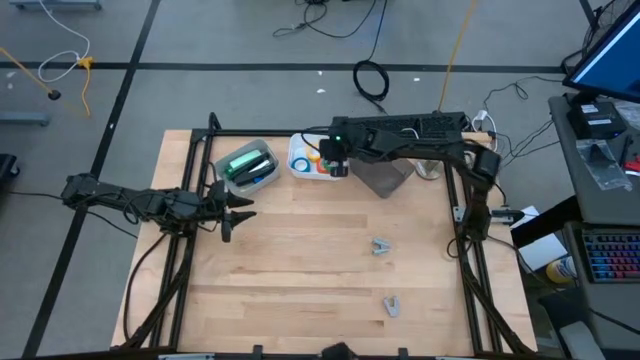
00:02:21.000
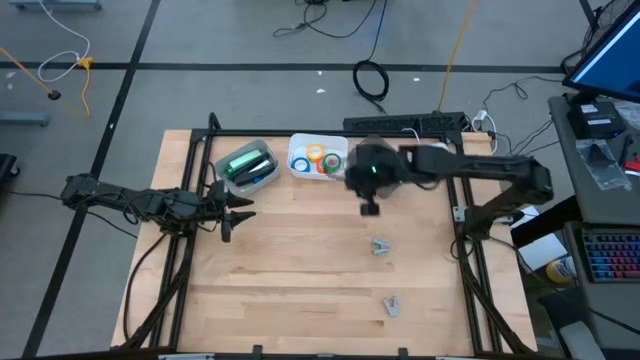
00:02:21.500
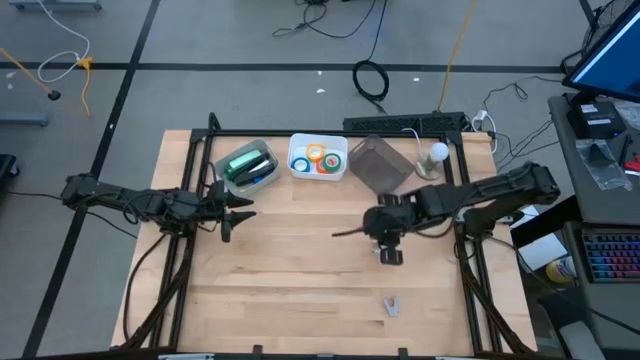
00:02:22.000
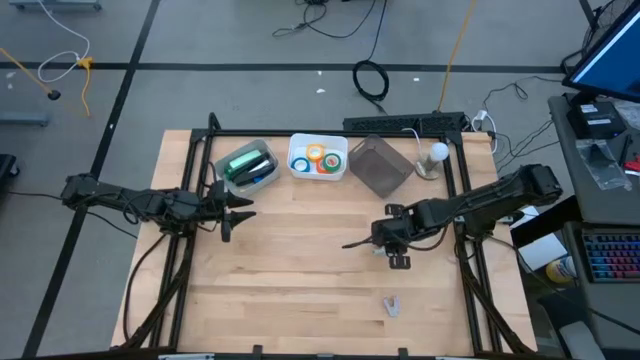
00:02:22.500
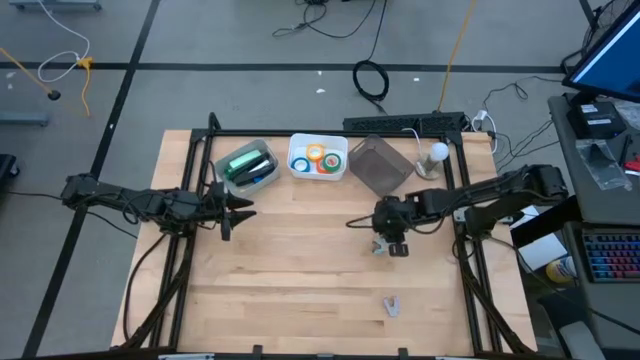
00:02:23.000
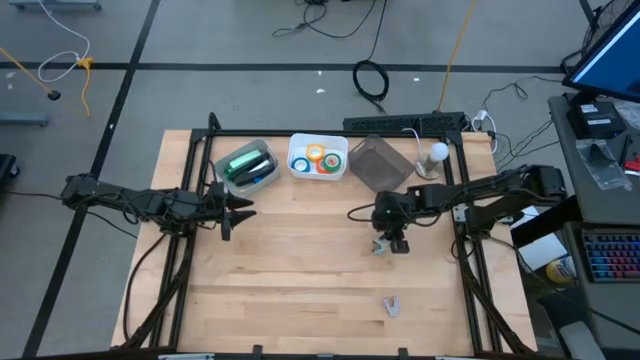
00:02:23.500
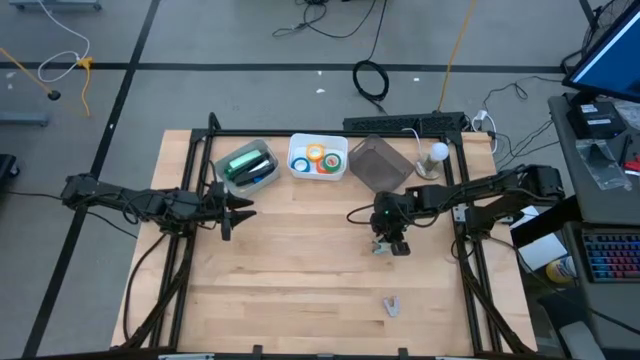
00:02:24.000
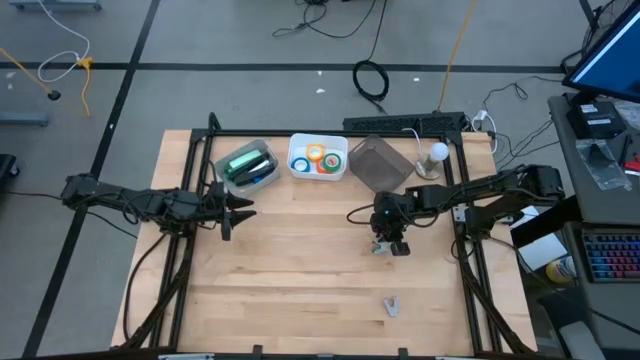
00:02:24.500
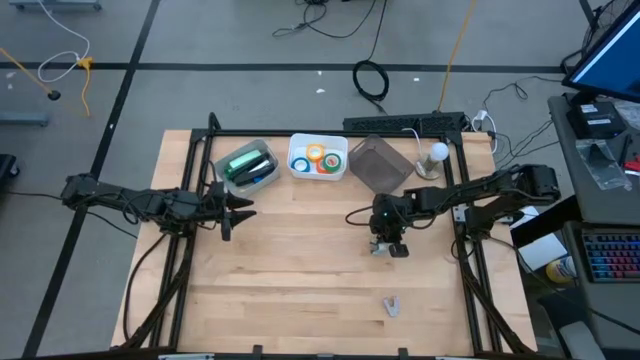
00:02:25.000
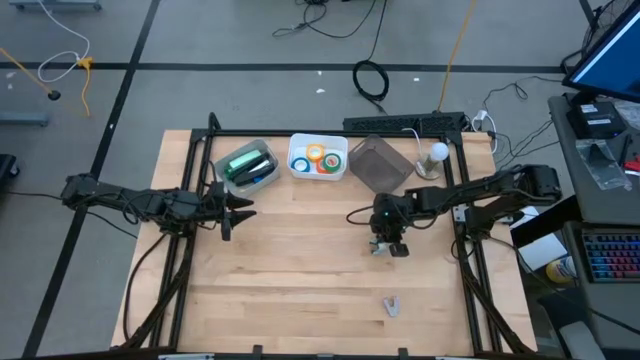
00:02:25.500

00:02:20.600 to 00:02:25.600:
Task: Pick and place Stapler, Stapler remover, tape
Put the light blue staple remover into the black bin

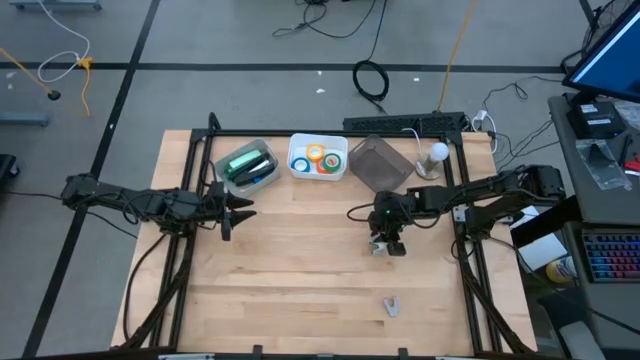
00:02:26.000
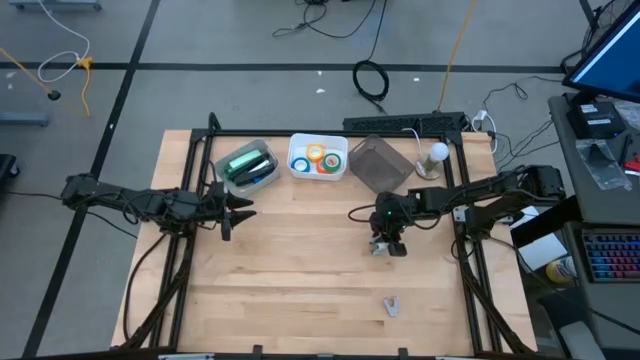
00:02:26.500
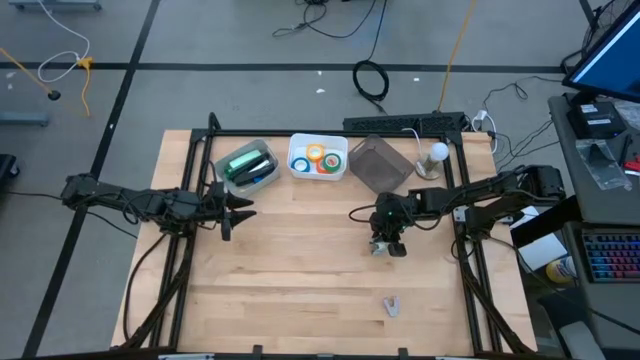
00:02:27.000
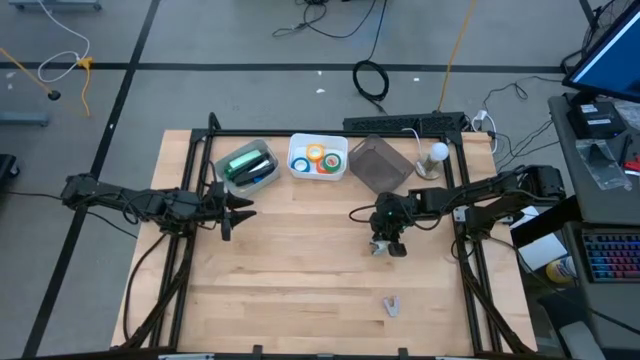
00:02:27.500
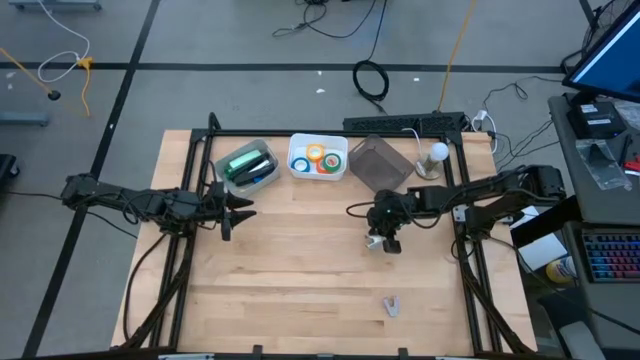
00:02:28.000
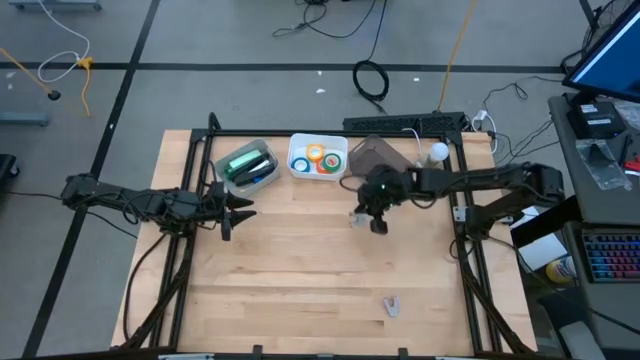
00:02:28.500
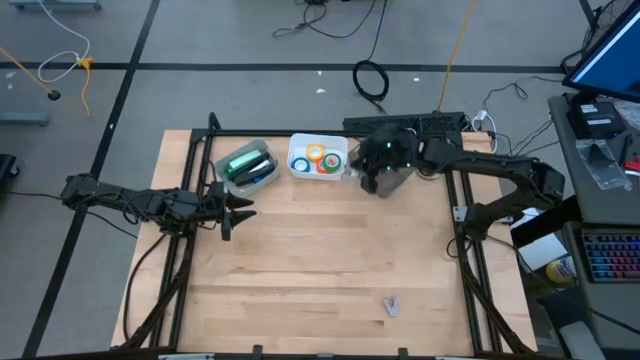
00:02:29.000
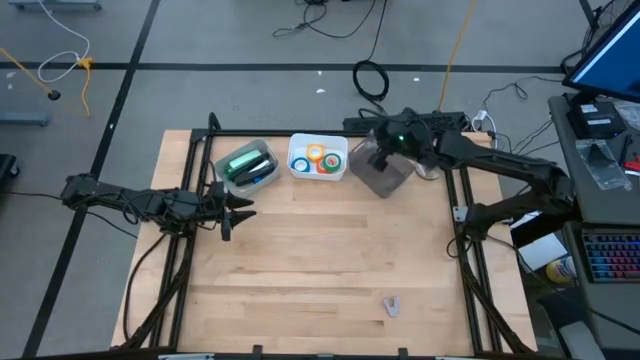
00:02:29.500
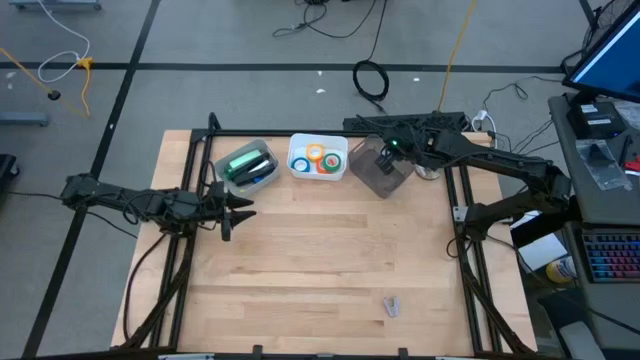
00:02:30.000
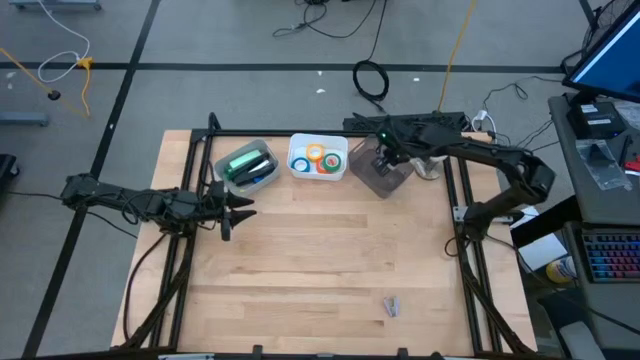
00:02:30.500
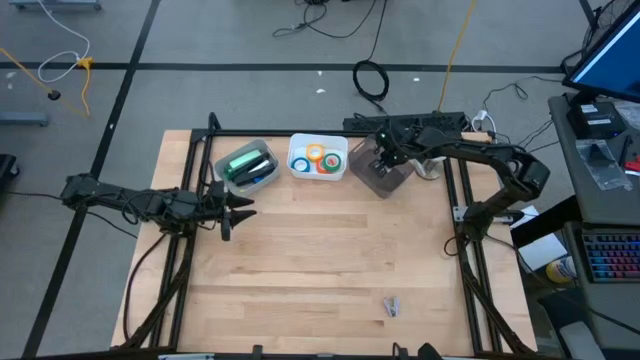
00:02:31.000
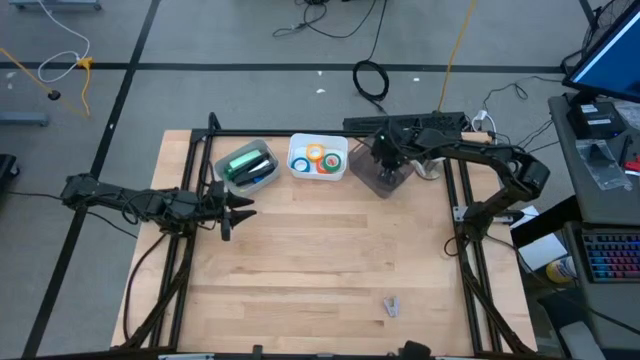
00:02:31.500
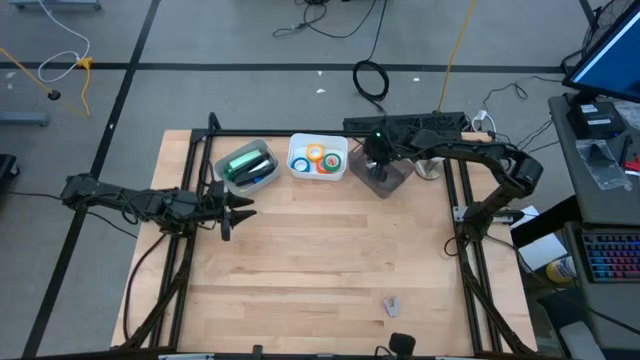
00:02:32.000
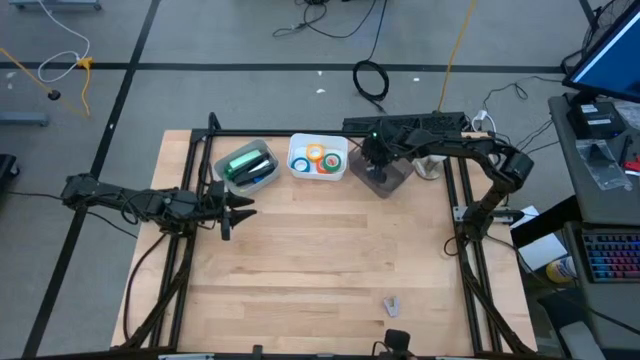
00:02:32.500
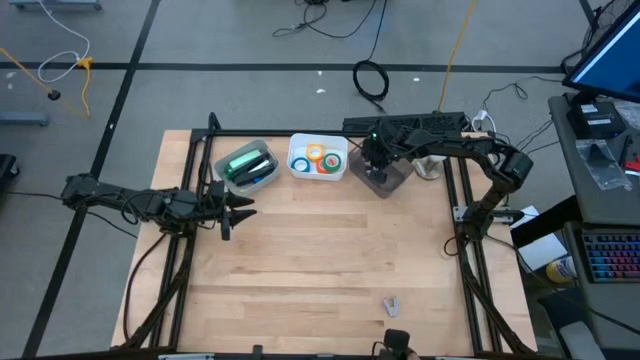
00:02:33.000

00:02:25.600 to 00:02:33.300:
Put the light blue staple remover into the black bin

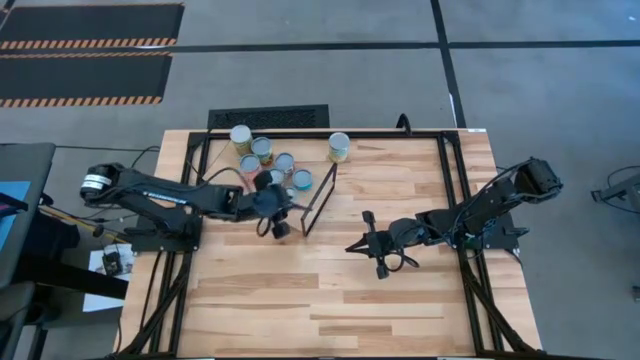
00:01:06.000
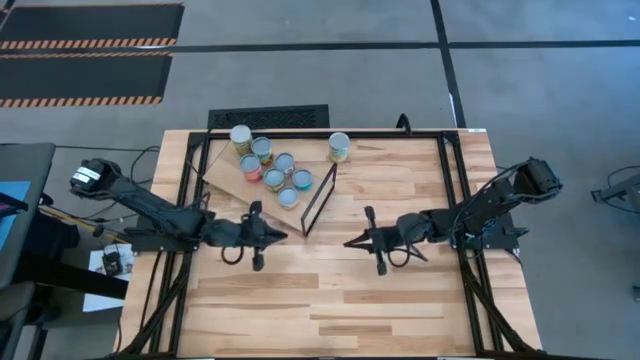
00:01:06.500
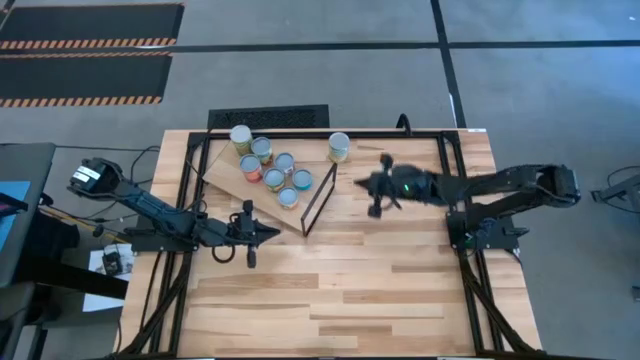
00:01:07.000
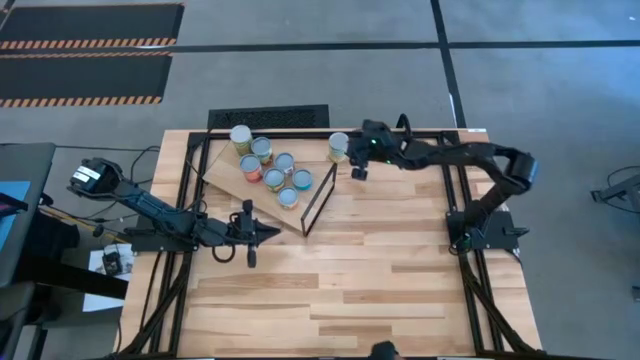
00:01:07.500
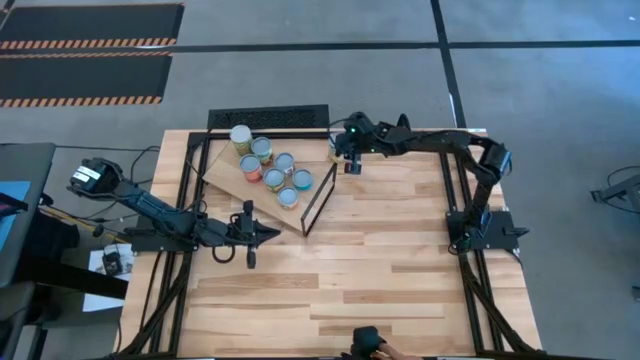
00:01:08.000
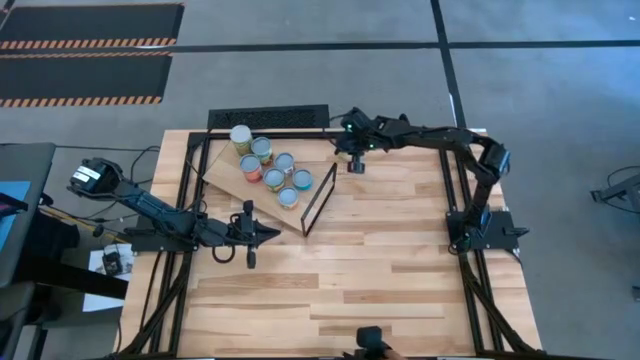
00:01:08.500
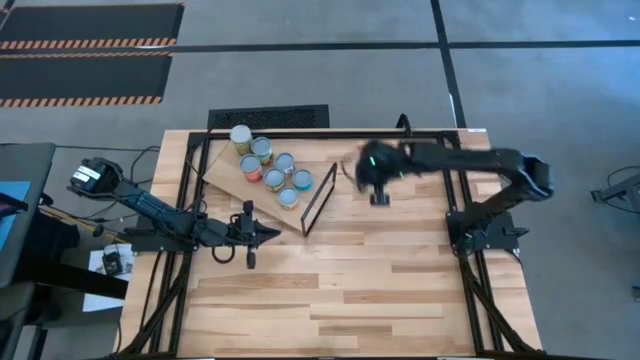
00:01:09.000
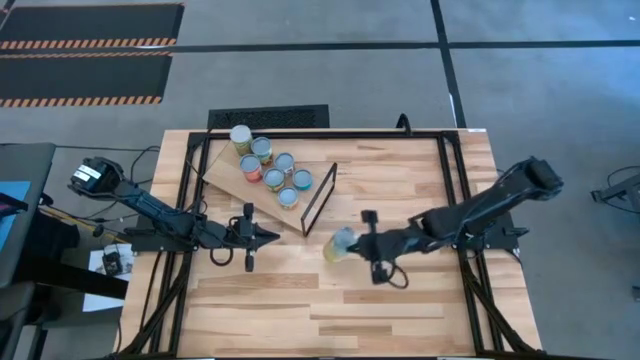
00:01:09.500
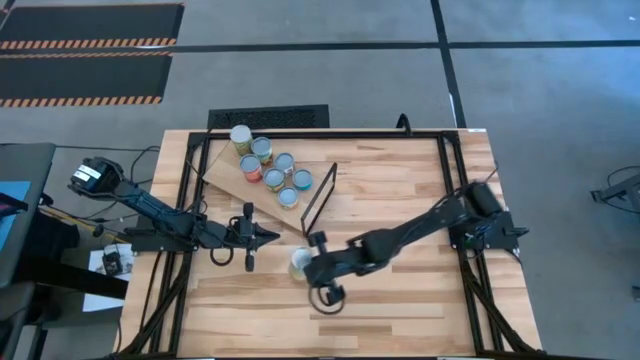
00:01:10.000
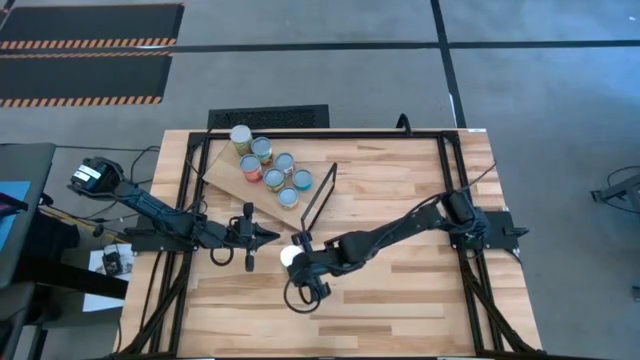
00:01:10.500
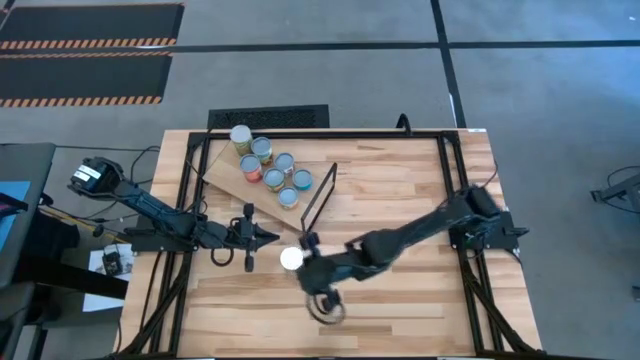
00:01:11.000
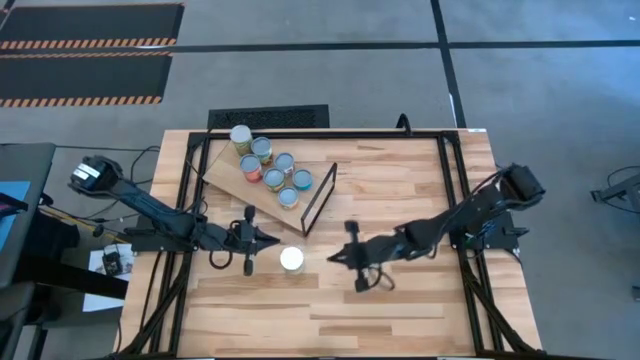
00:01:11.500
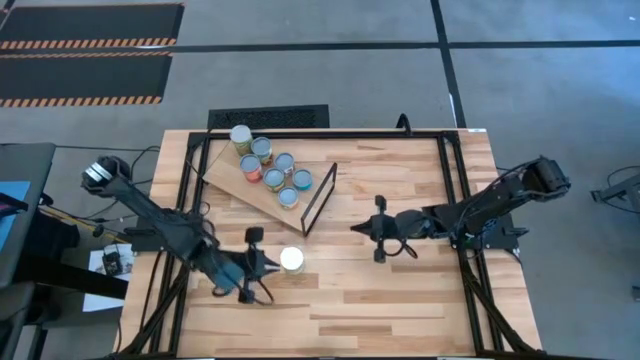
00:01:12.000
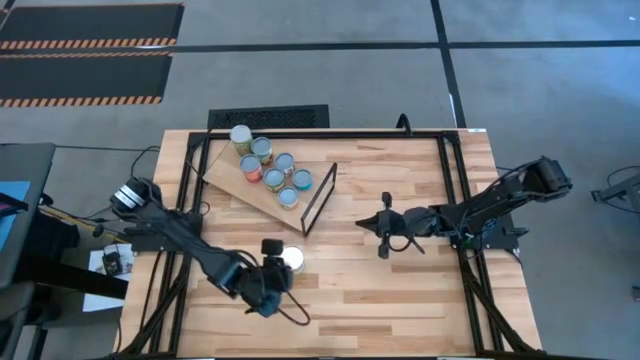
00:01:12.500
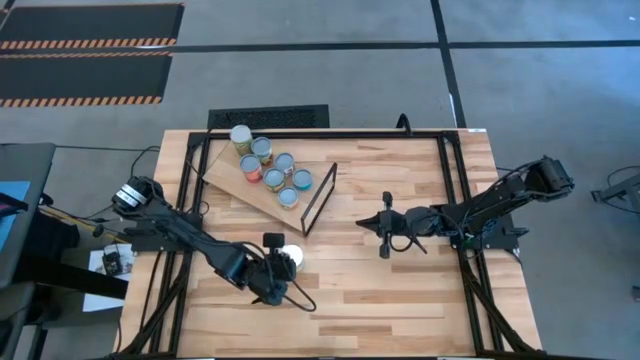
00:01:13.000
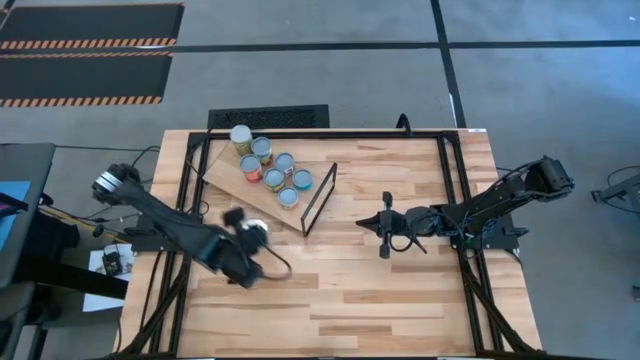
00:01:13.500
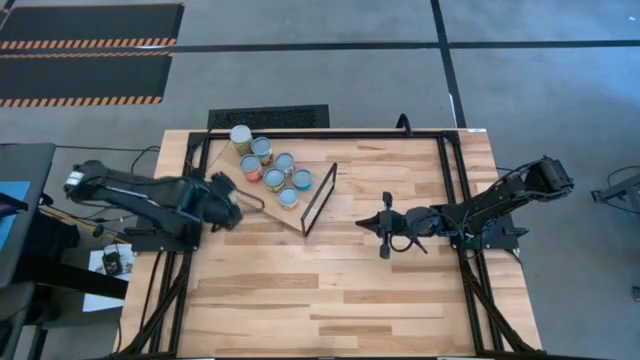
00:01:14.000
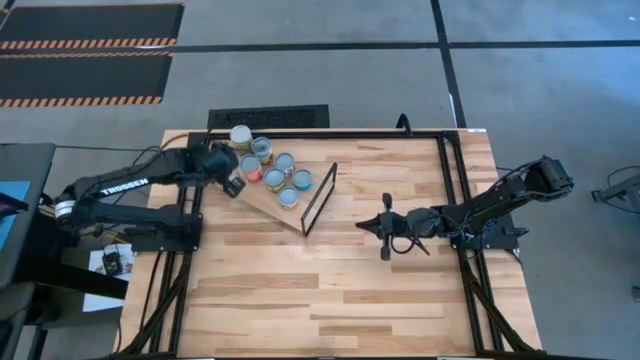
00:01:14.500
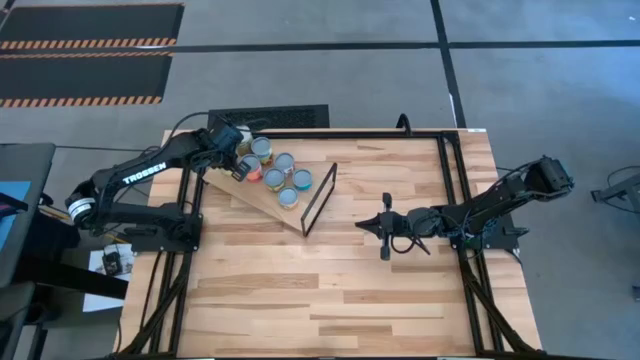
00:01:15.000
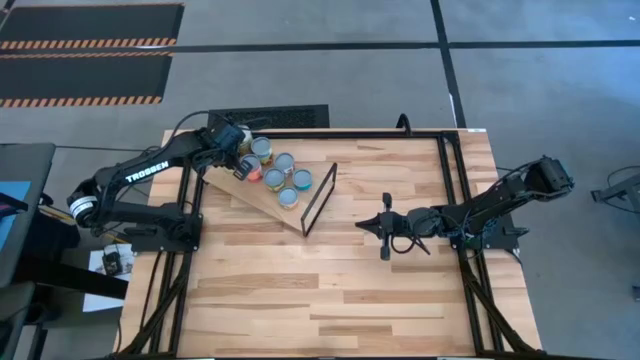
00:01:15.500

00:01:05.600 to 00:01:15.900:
Task: Pick and place cans onto a shelf
Put the canned carrots on the shelf
